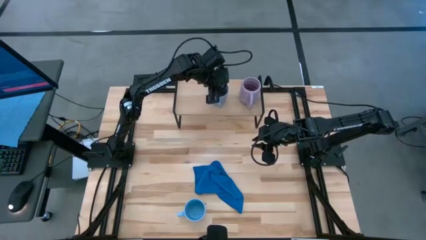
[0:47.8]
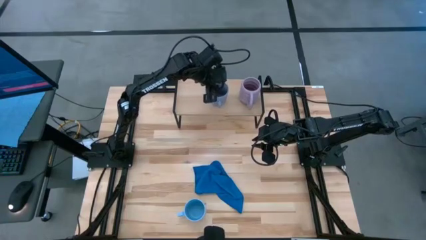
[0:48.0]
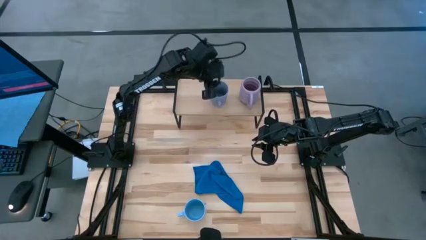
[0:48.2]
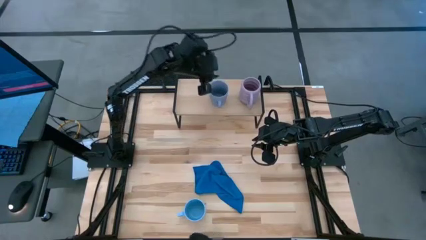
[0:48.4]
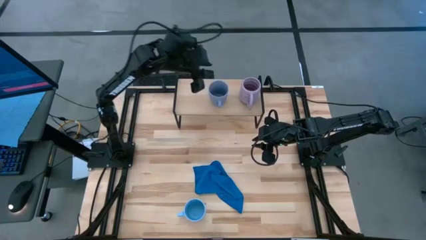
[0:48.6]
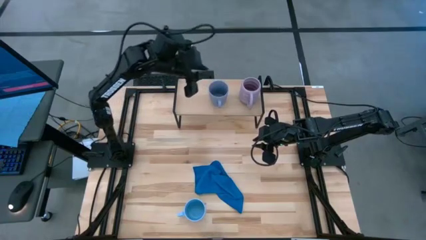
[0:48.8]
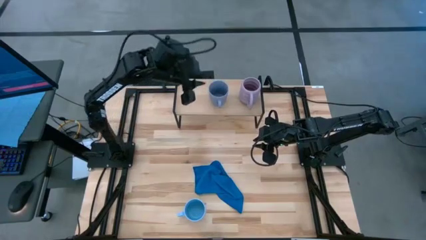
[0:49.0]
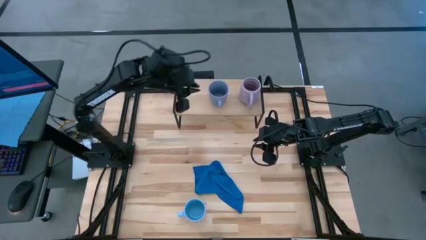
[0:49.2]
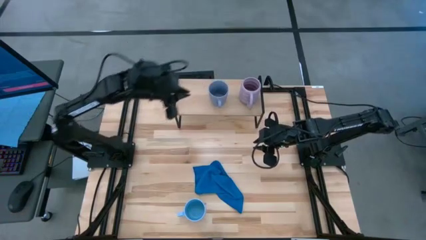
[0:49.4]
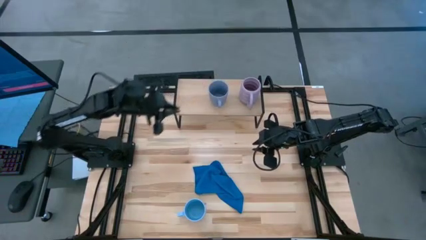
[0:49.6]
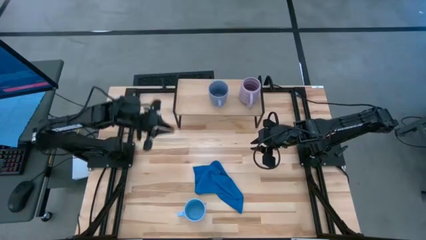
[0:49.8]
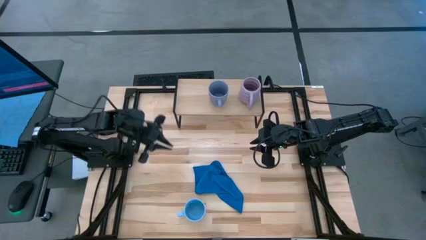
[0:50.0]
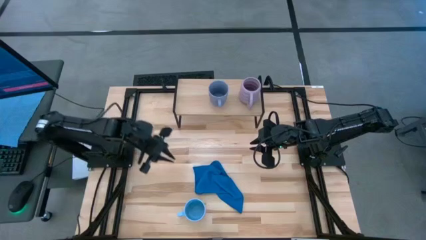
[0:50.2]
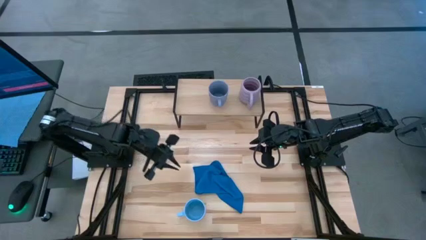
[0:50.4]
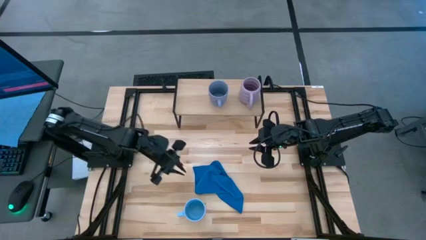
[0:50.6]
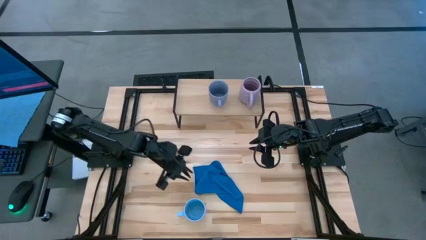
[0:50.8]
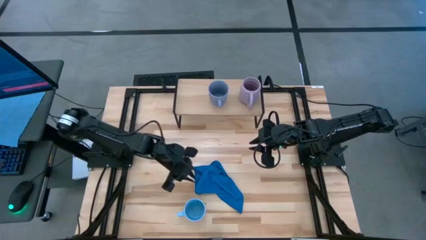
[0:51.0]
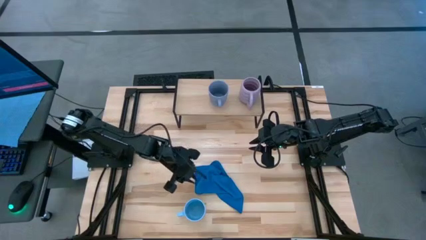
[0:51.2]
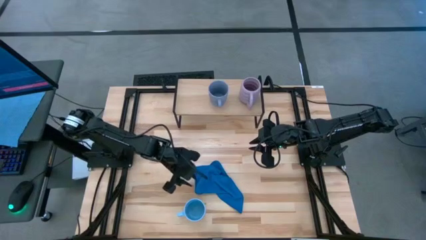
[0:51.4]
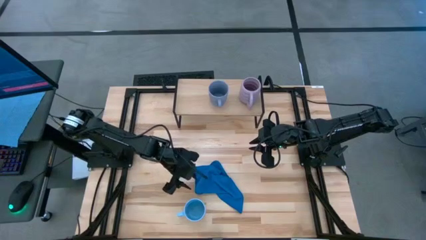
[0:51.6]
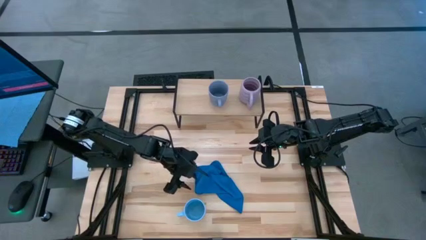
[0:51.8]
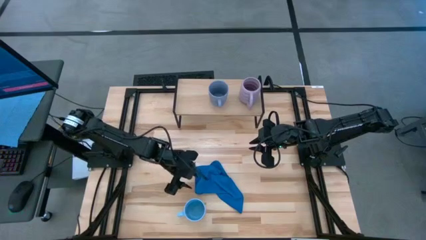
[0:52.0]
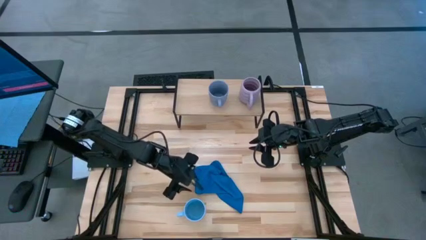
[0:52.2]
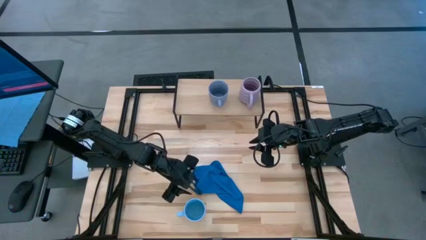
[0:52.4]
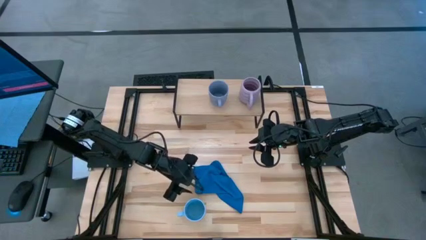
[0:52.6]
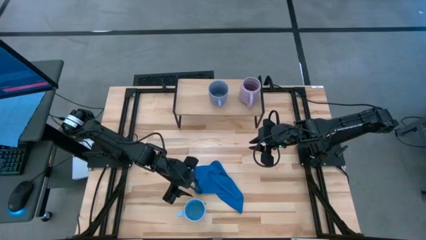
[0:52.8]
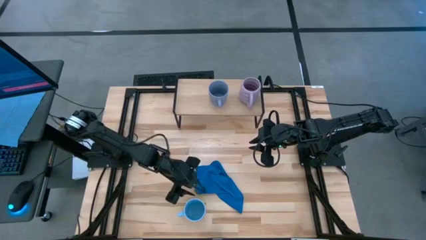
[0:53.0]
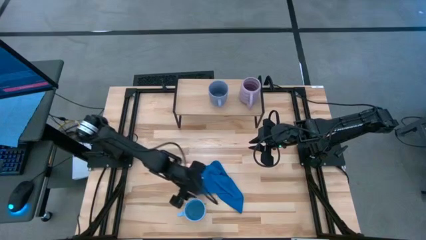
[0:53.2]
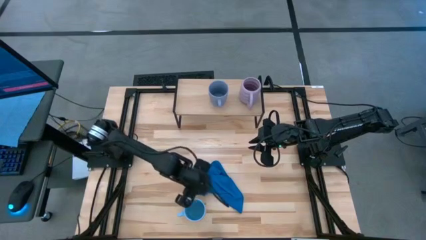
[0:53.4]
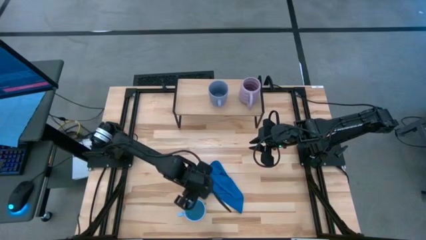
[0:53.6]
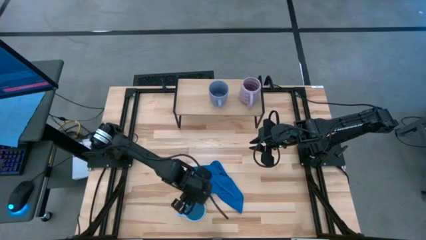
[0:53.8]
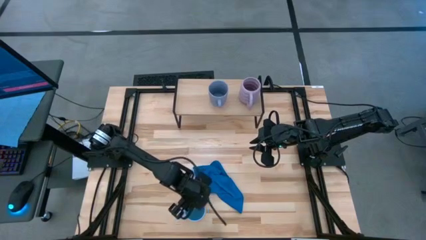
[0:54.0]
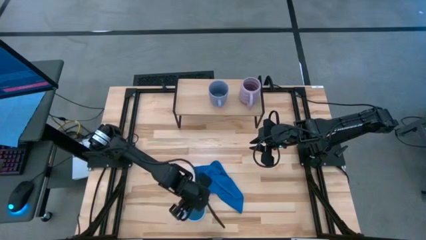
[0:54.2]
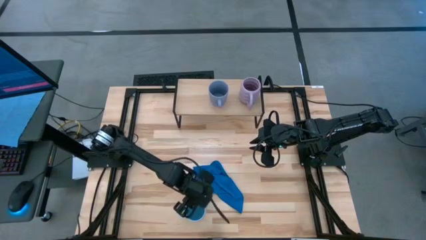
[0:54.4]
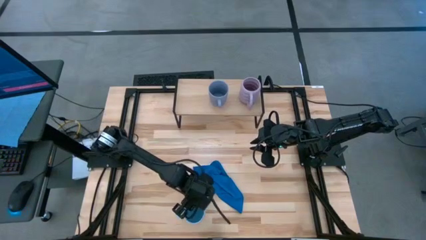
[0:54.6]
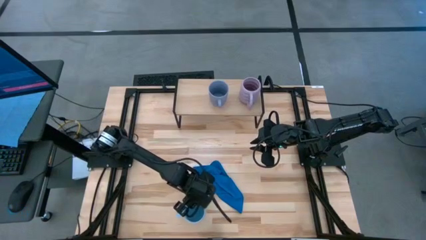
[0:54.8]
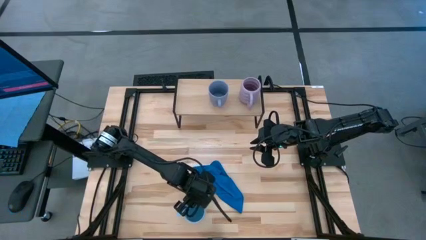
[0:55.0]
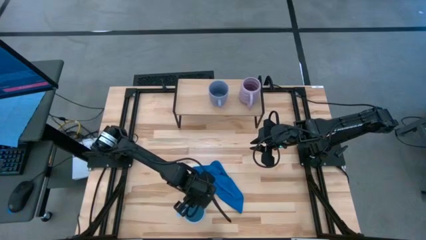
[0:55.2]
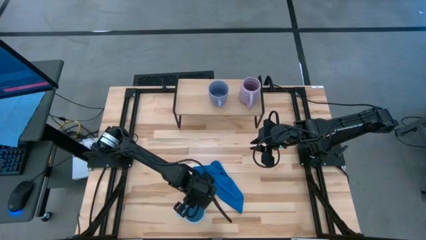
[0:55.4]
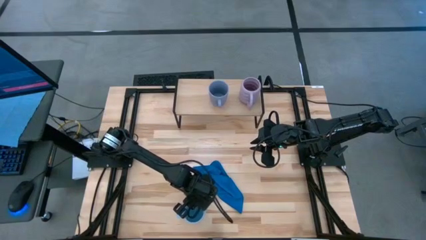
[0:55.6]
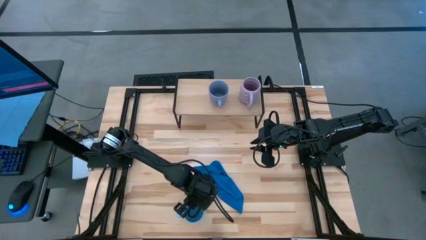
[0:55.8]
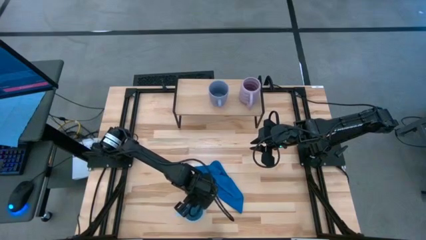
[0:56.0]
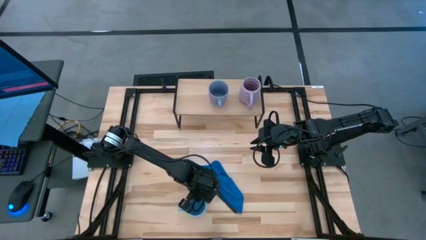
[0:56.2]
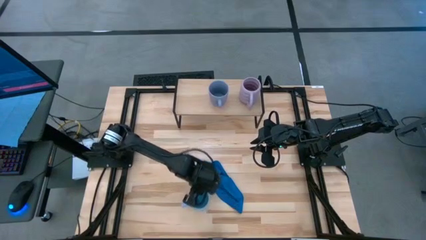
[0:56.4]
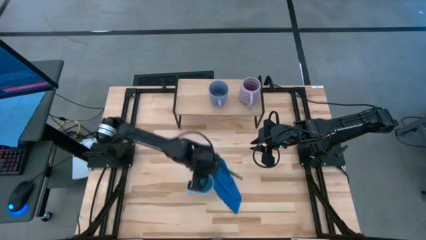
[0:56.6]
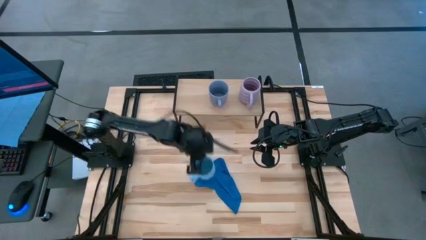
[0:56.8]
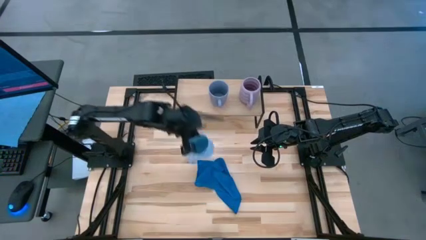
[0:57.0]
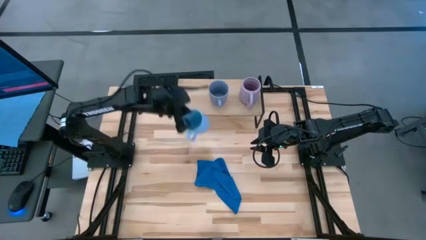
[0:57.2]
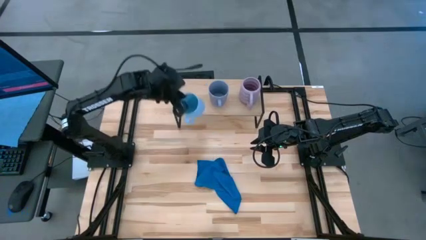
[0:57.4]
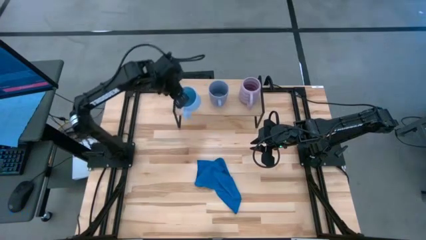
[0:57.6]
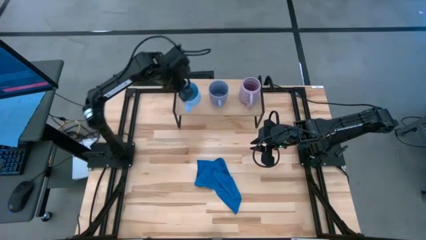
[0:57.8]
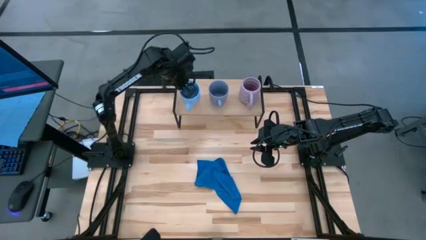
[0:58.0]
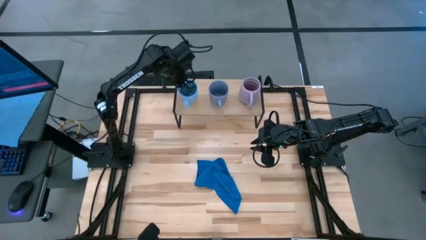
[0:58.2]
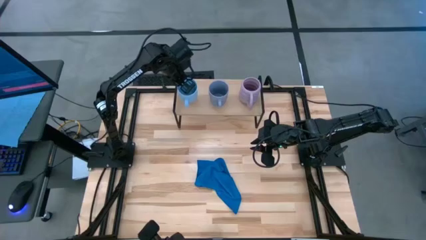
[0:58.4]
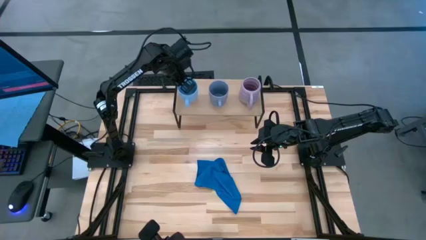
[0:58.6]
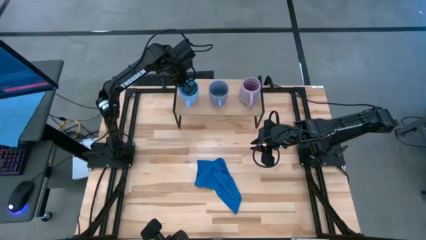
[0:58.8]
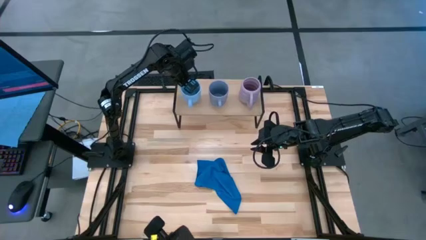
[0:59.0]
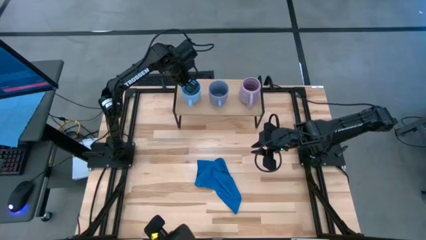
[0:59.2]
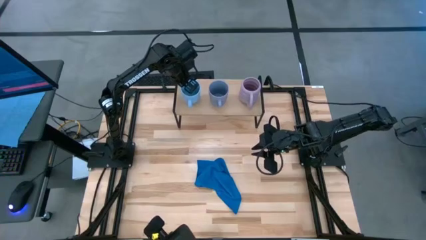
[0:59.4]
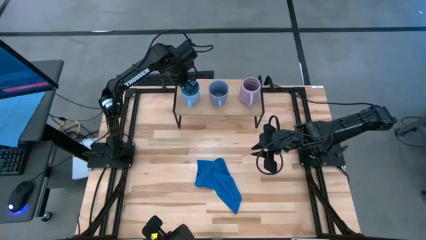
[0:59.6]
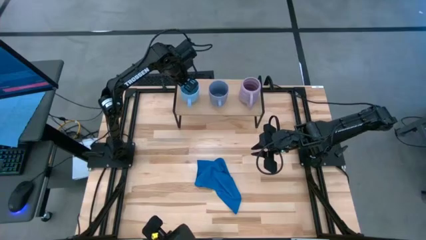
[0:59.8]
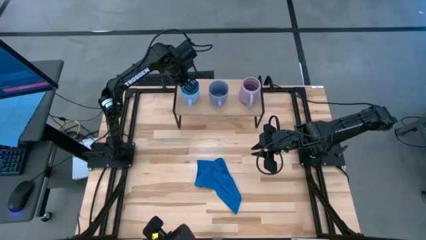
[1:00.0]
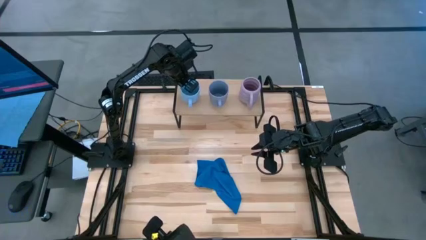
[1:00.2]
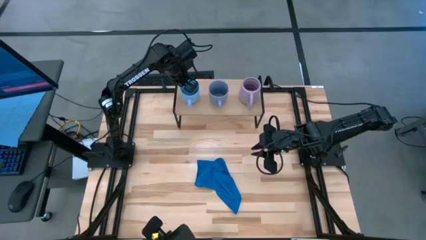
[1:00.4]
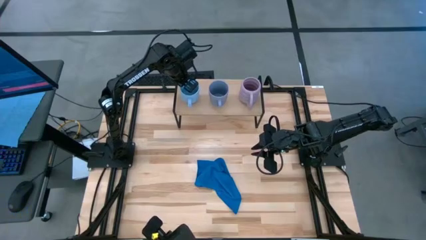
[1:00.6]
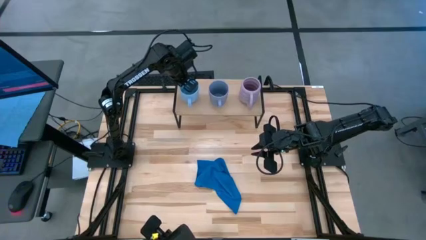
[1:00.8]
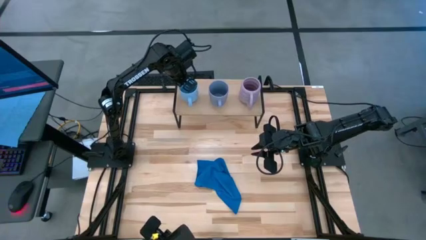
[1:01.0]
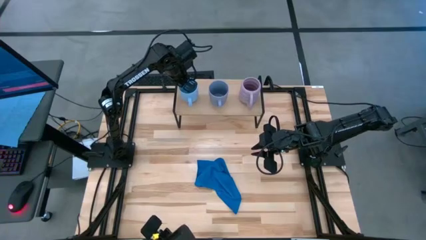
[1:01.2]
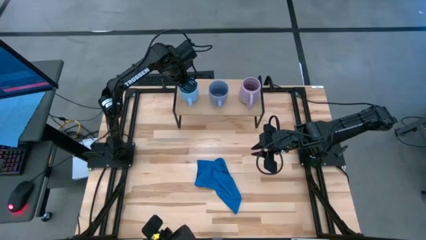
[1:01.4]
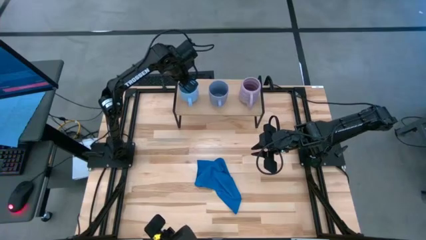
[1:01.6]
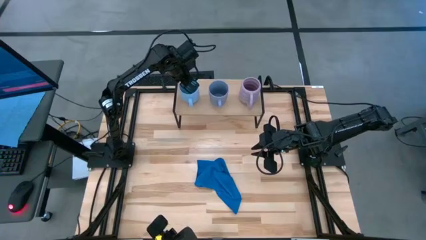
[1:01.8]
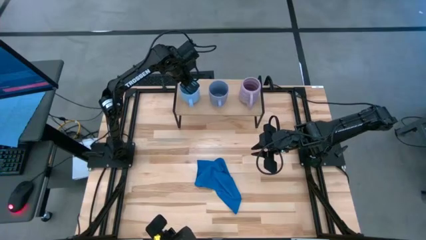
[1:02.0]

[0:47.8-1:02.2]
Task: Stack small to large cups/mugs on shelf
Put the light blue mug on the shelf
